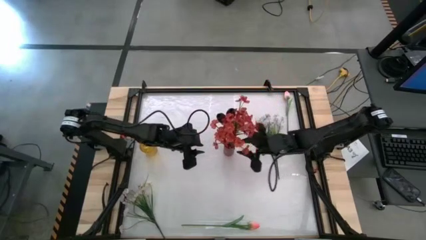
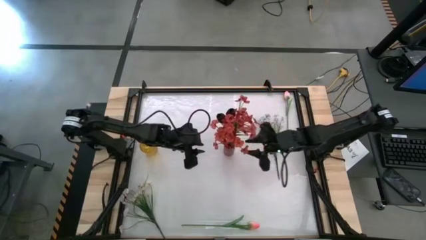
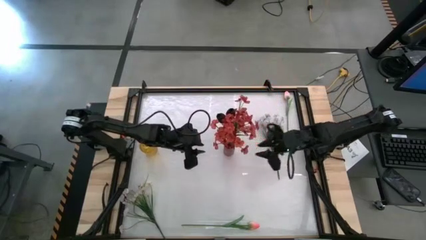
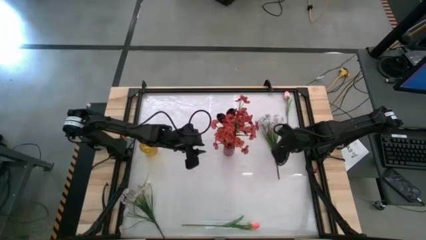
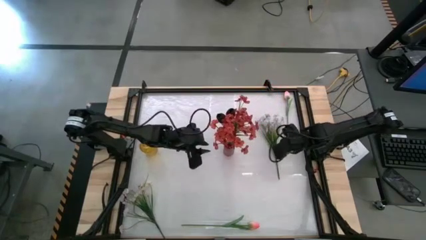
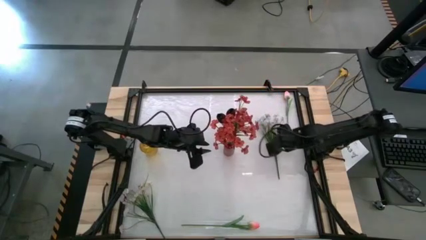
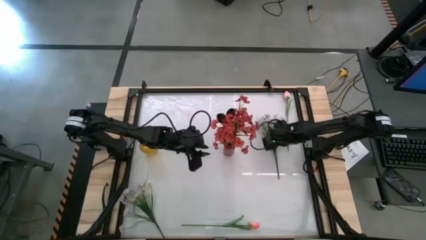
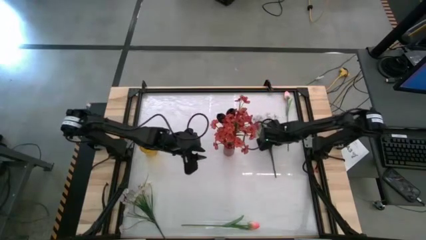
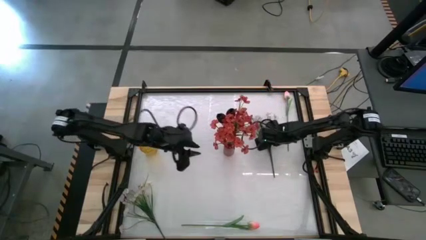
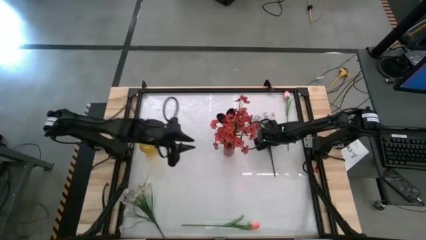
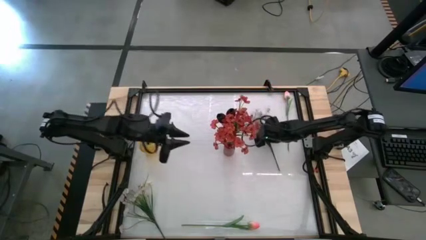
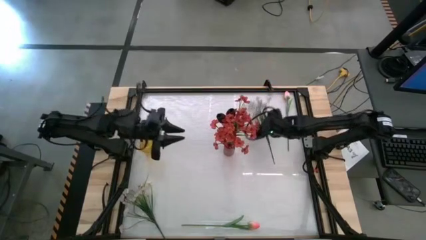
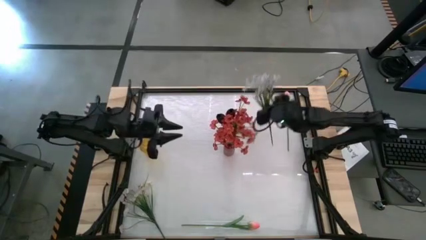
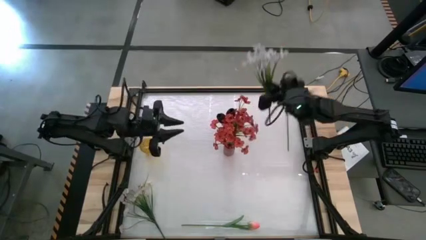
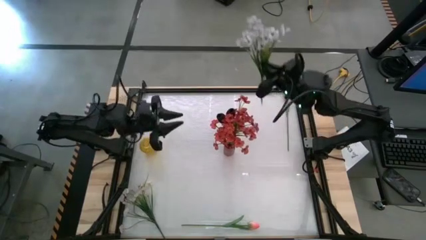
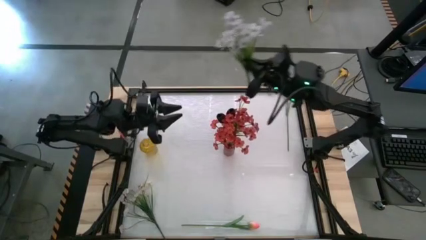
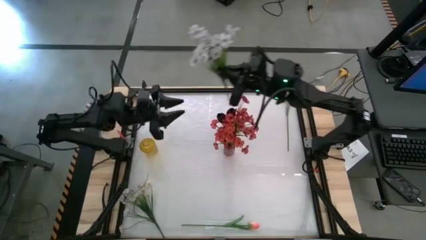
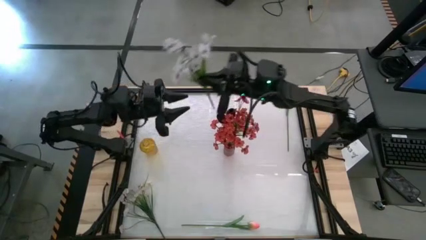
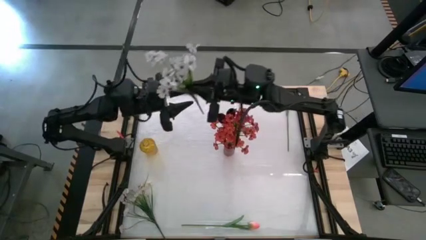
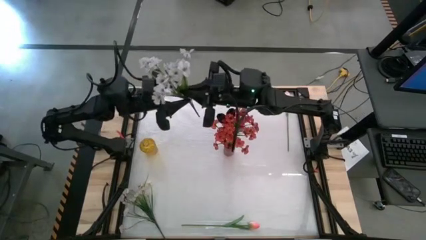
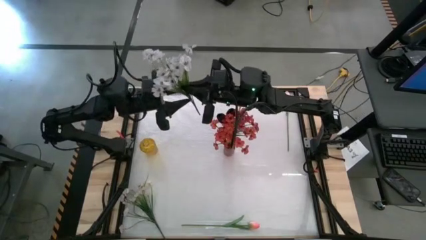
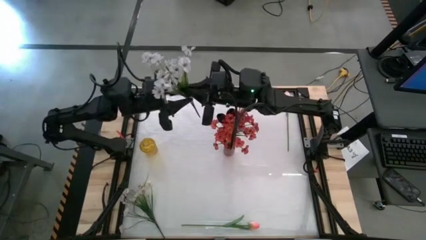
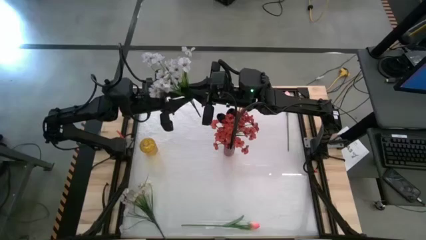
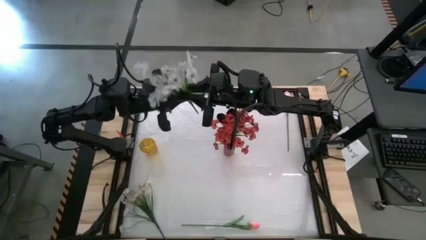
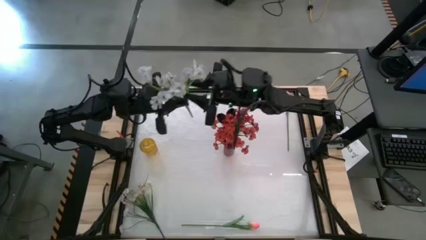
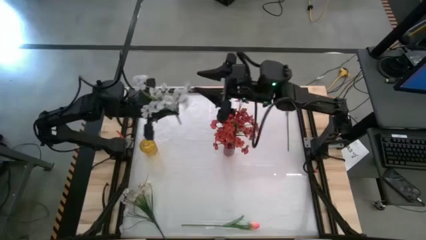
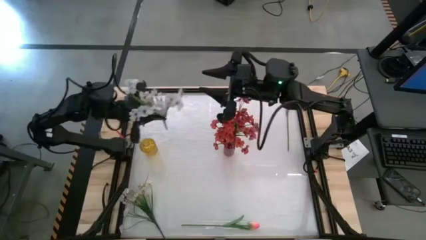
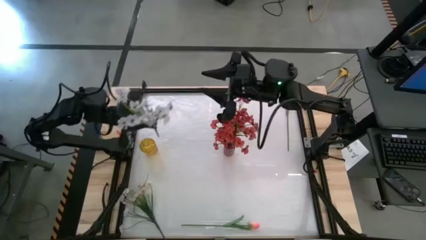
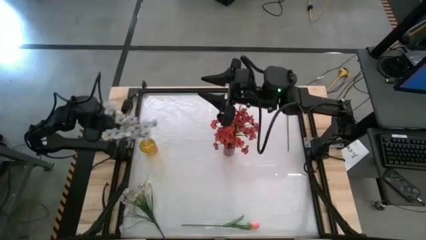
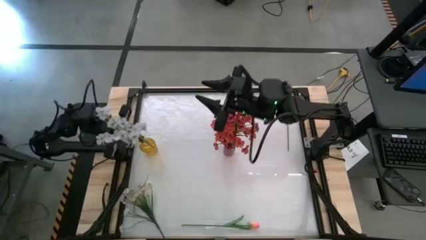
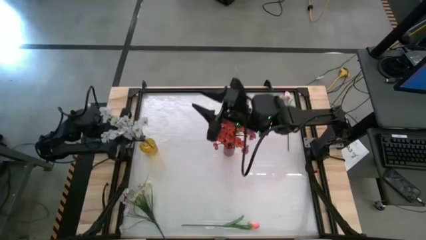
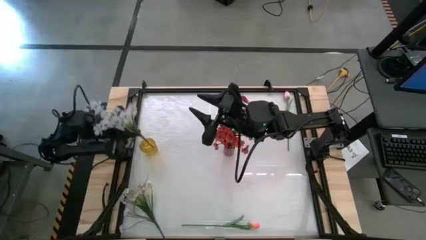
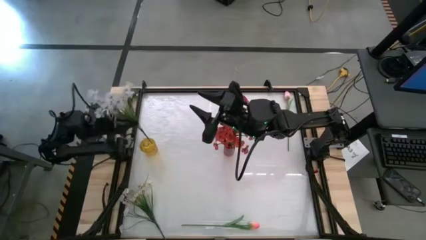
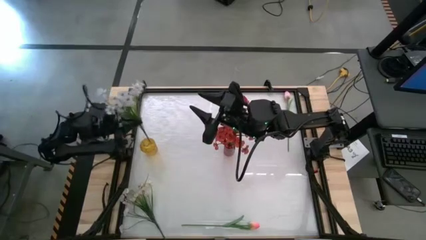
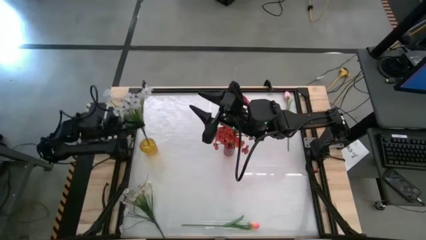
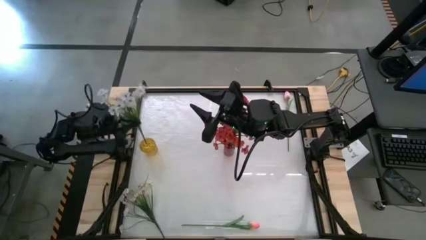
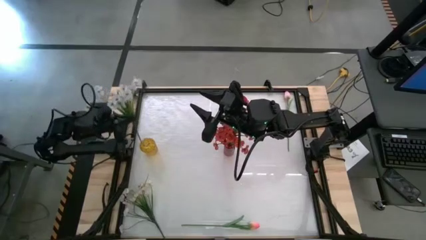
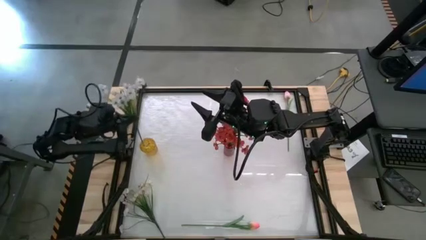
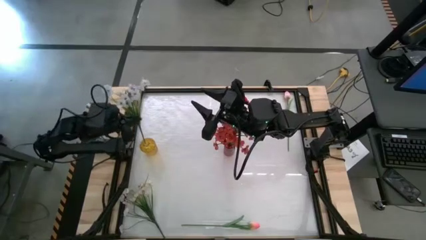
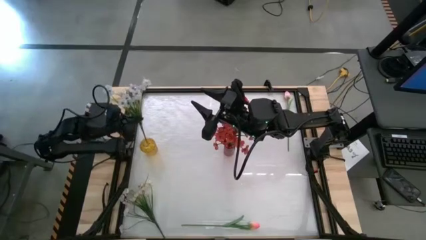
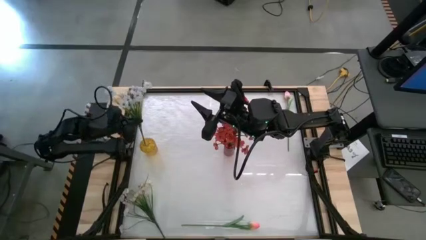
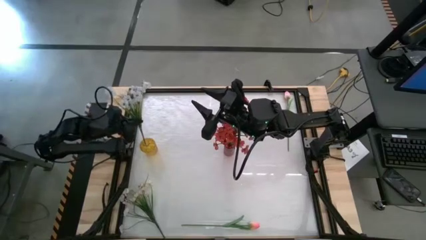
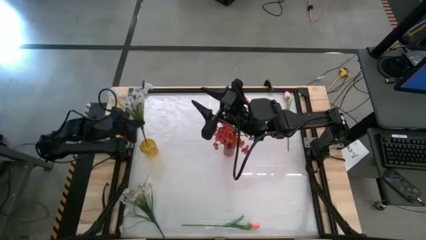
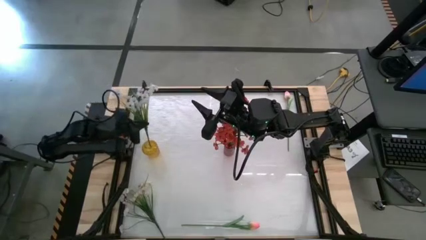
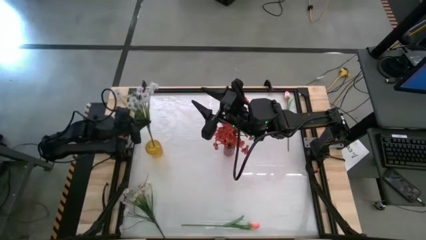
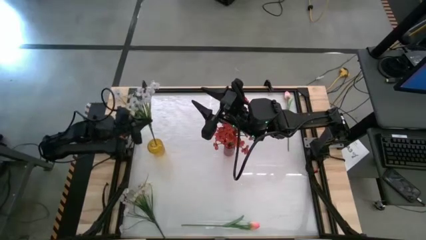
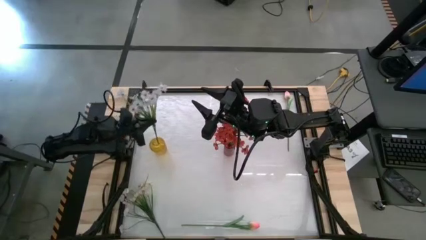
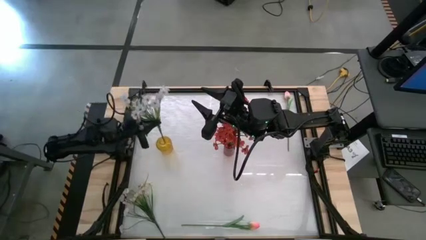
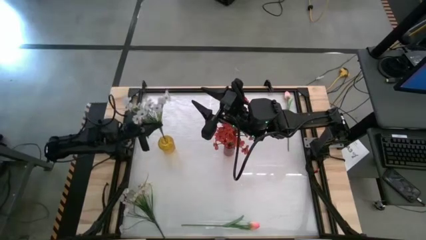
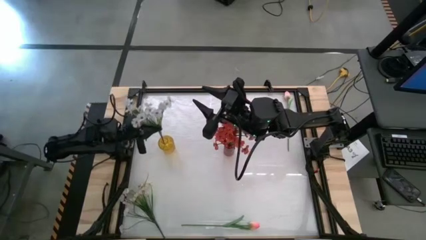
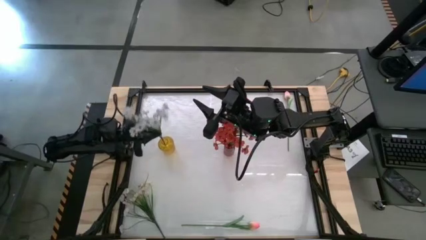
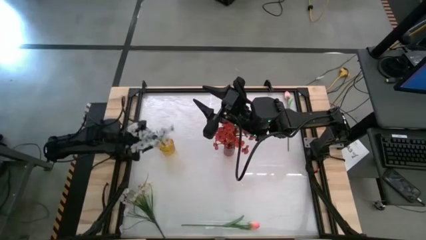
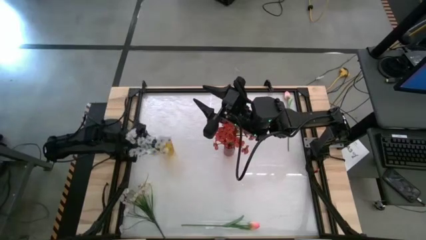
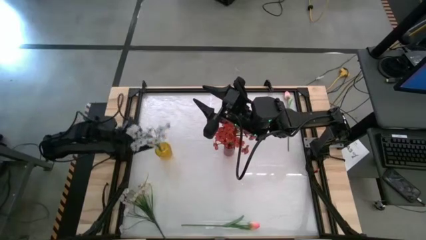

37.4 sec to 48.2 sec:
Task: Sort flowers into vase by color
Put the right white flowers into the yellow vase

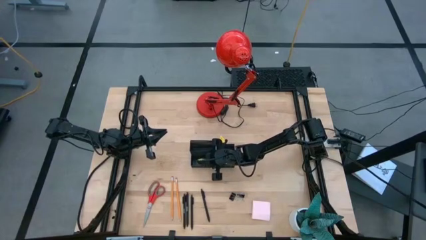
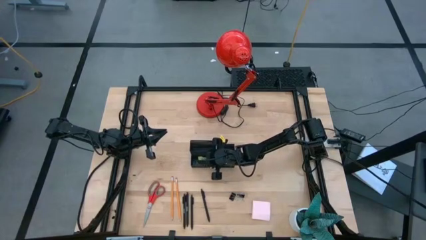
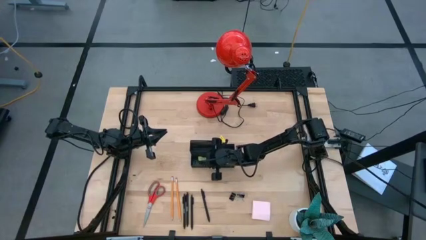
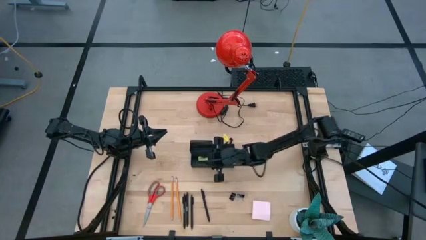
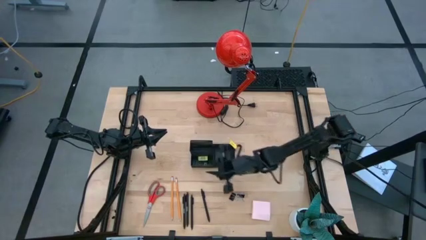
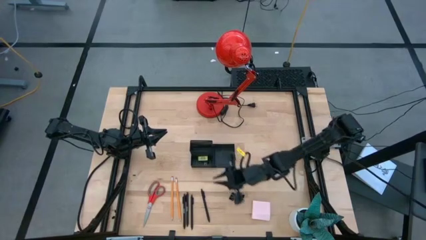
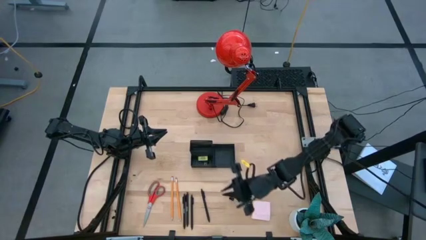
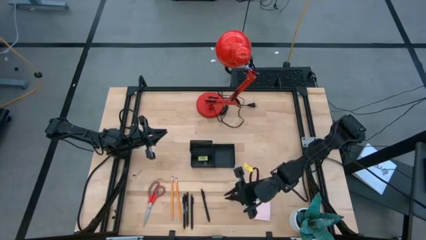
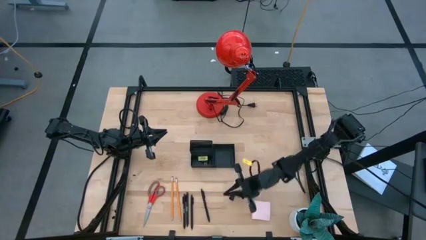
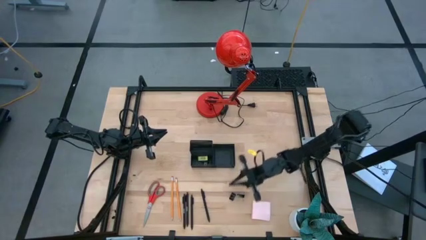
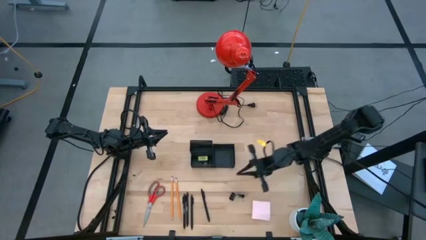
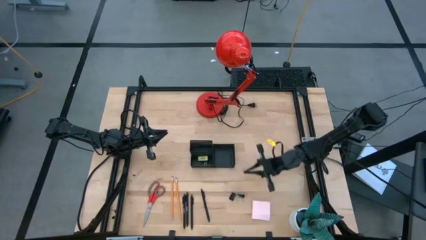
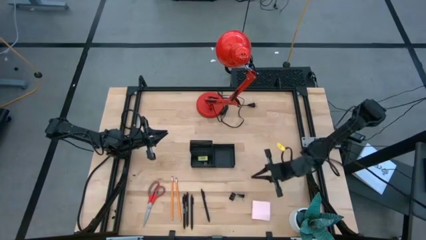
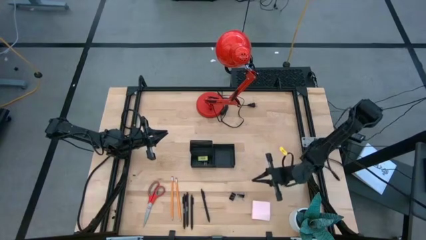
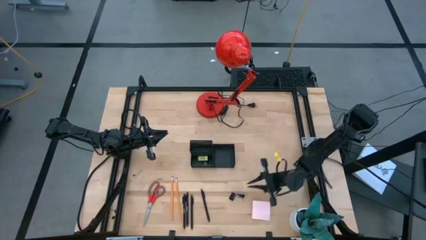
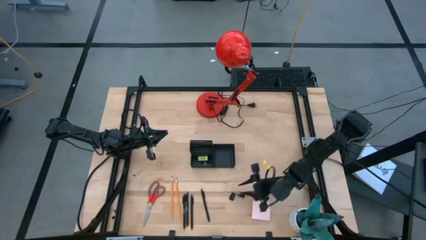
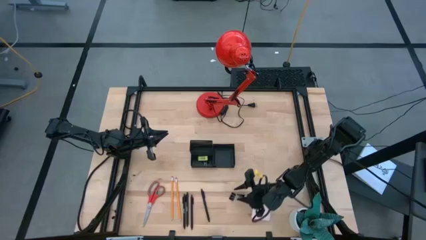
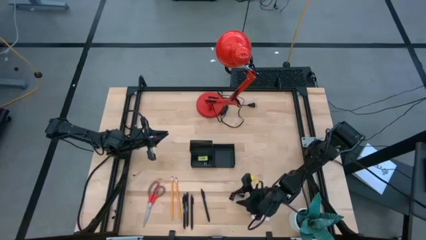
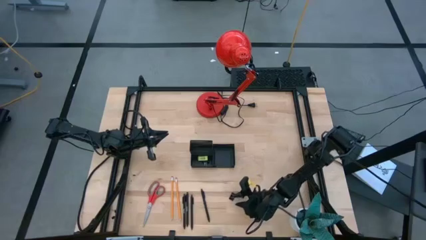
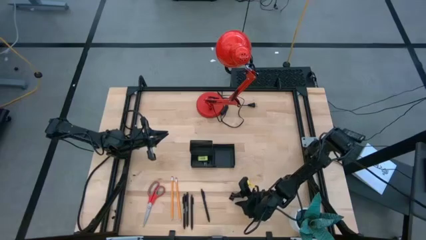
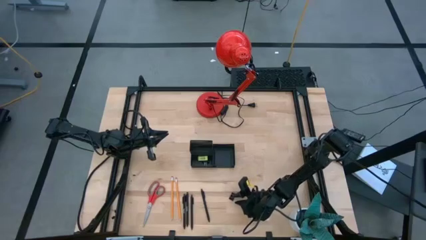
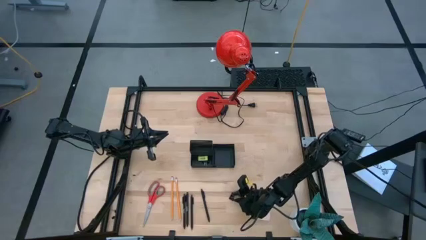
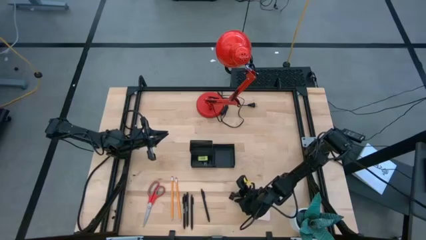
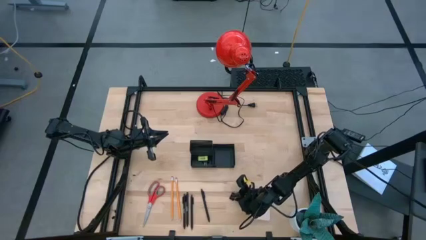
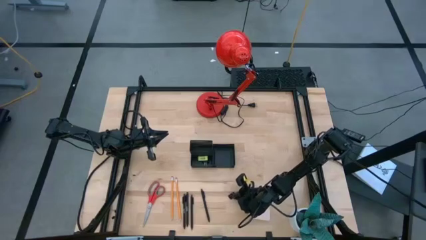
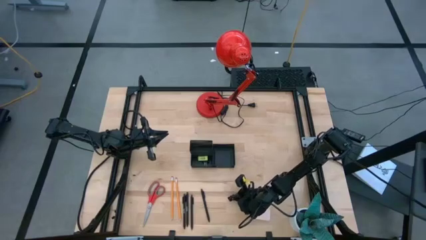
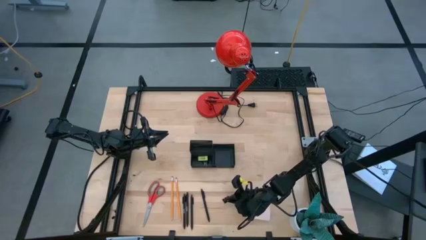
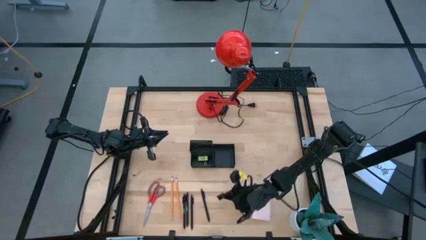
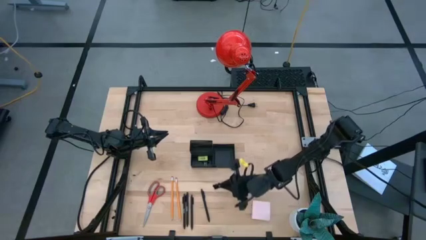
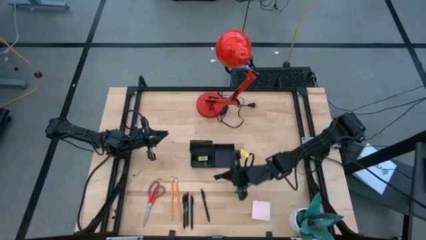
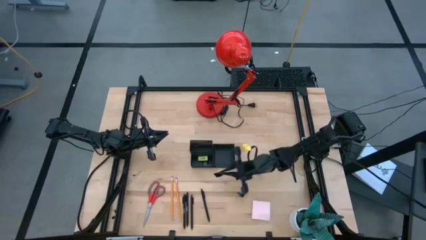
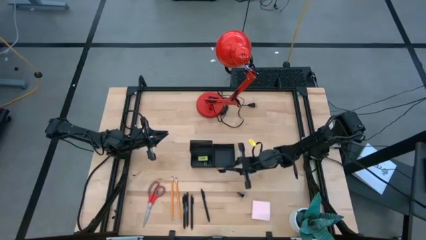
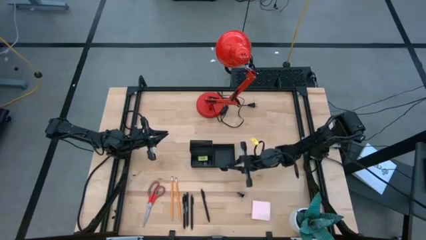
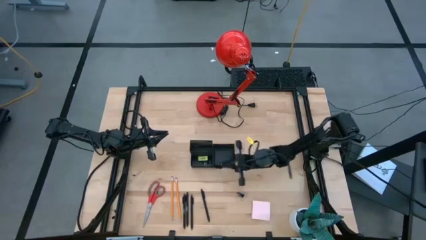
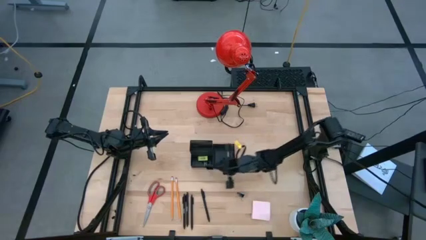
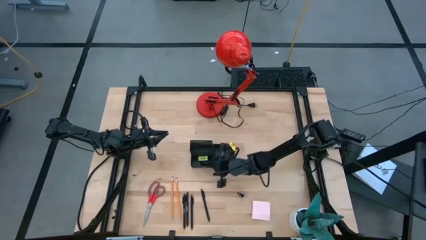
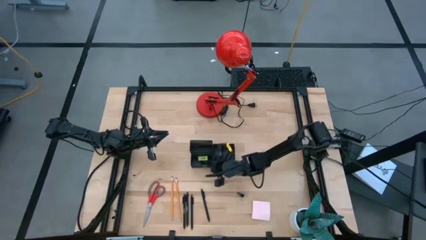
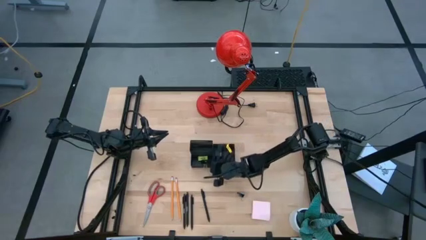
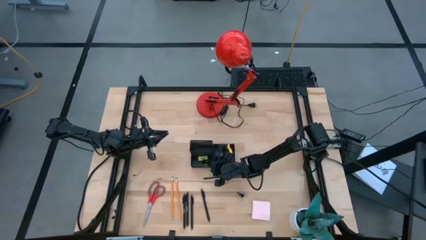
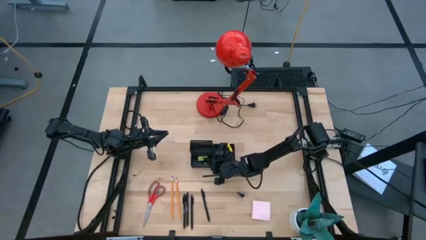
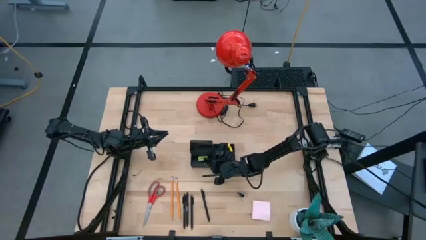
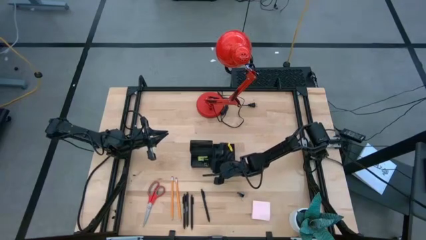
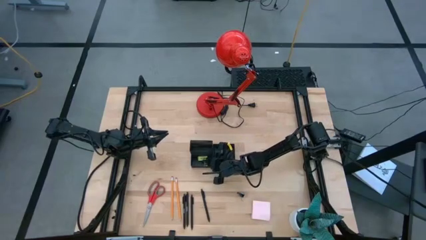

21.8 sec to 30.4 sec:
Task: Pick and place office supplies into organizer
Put the black binder clip into the black mesh desk organizer
